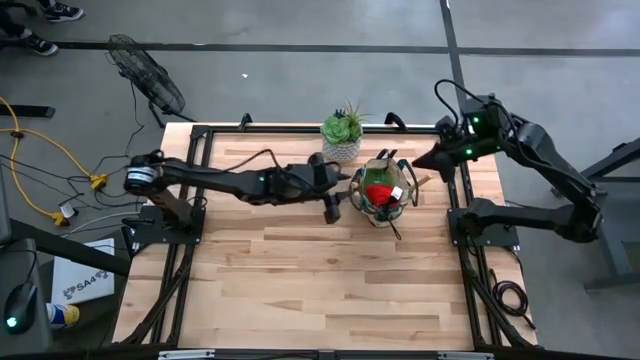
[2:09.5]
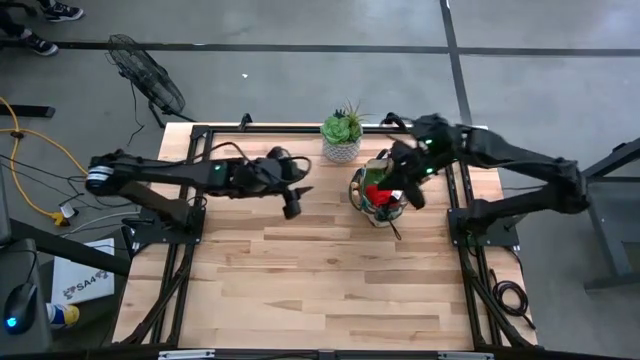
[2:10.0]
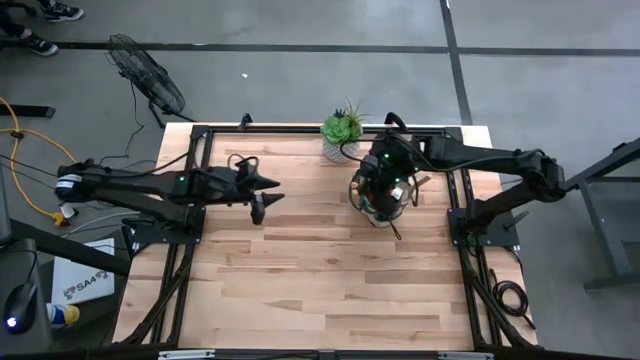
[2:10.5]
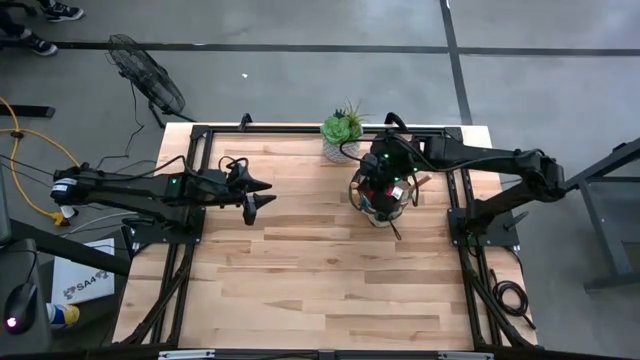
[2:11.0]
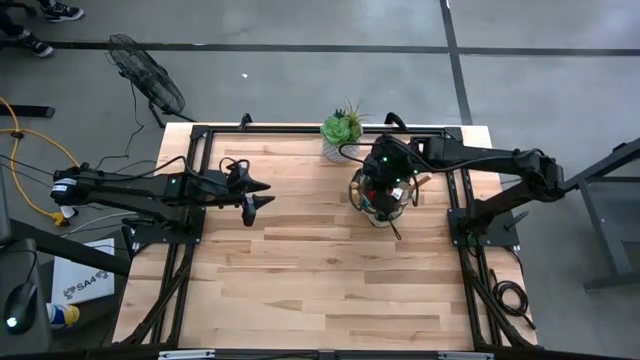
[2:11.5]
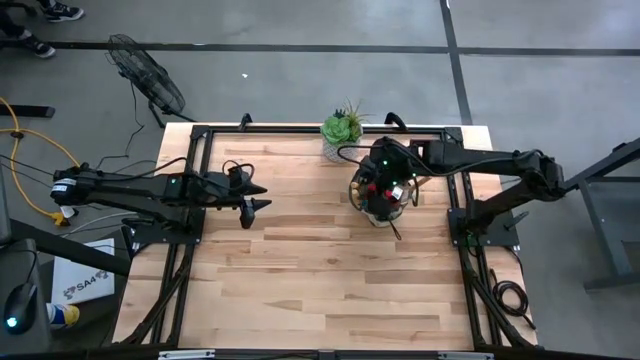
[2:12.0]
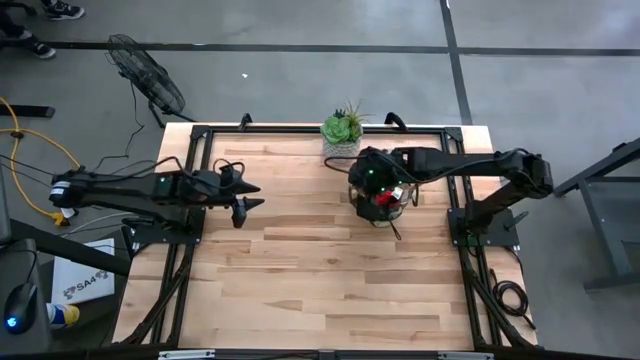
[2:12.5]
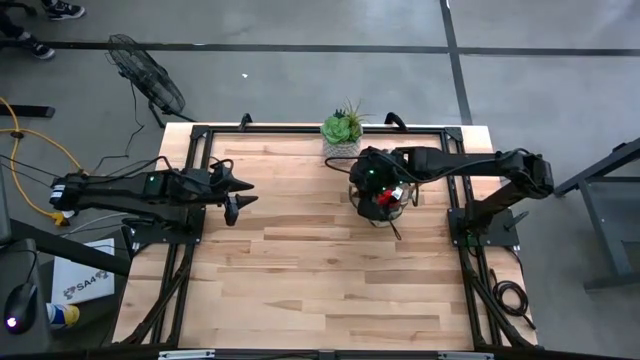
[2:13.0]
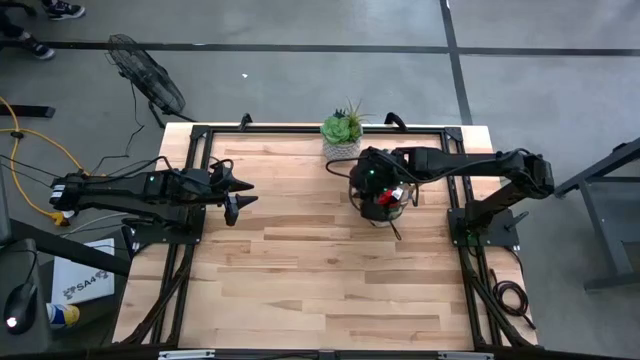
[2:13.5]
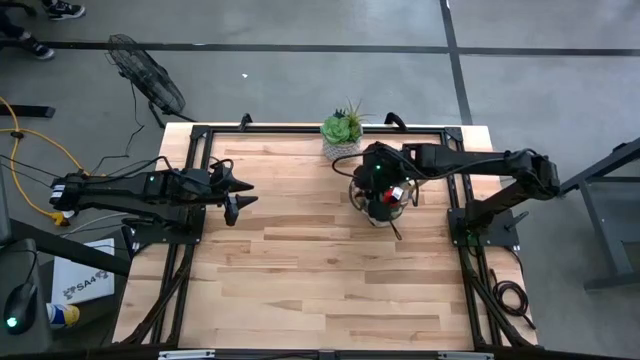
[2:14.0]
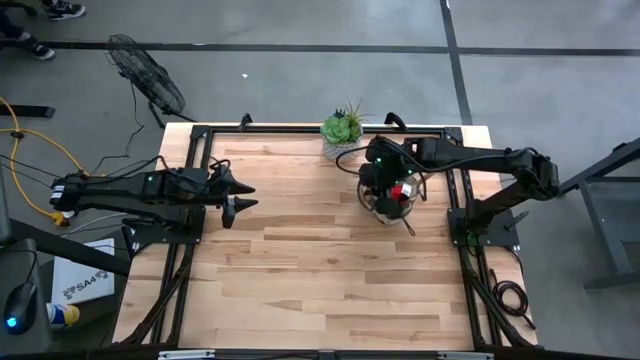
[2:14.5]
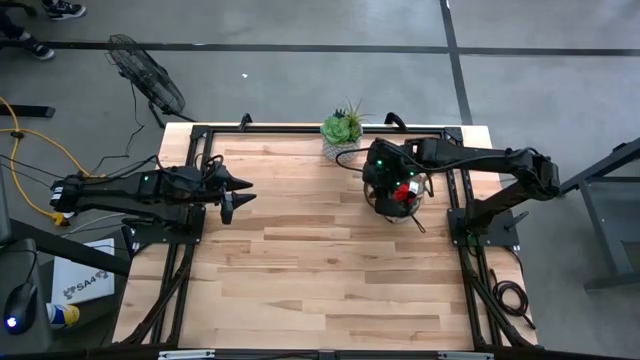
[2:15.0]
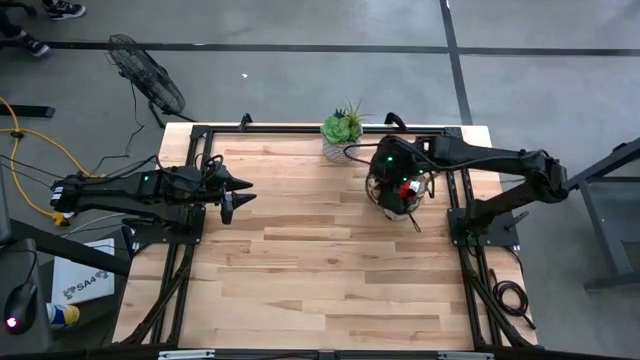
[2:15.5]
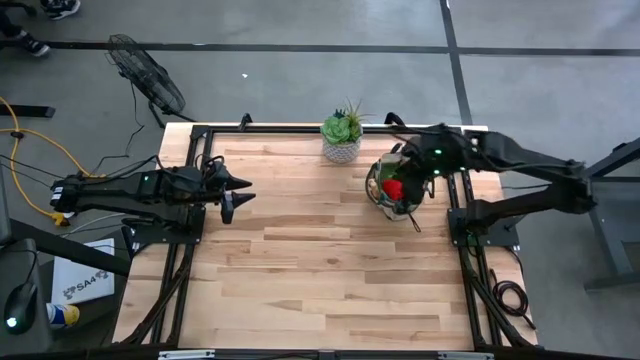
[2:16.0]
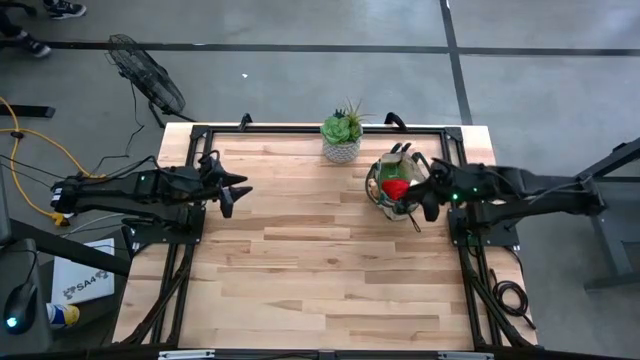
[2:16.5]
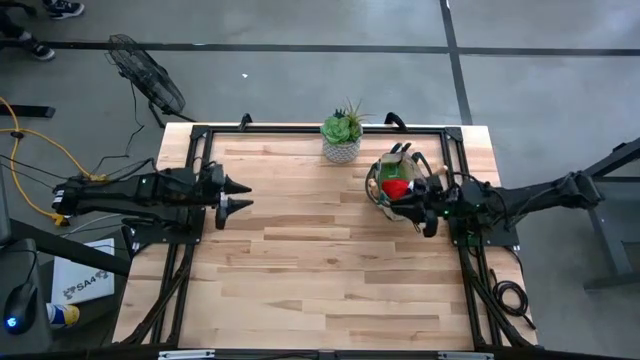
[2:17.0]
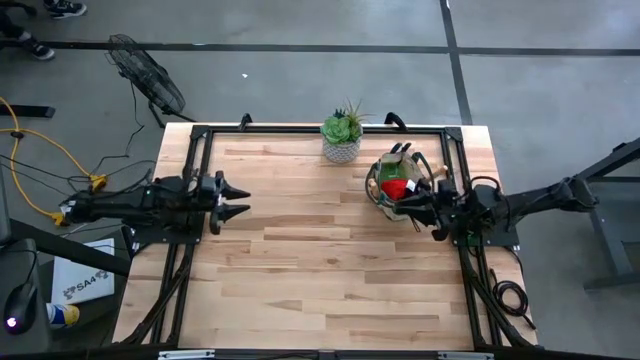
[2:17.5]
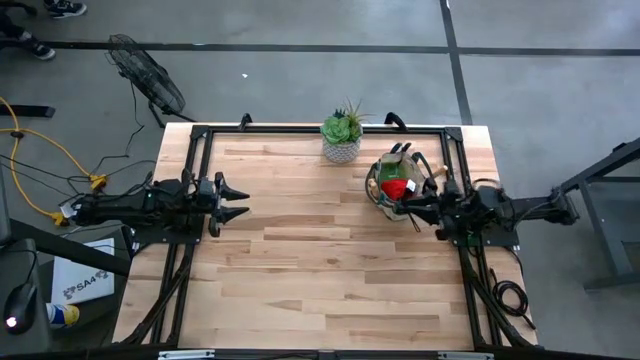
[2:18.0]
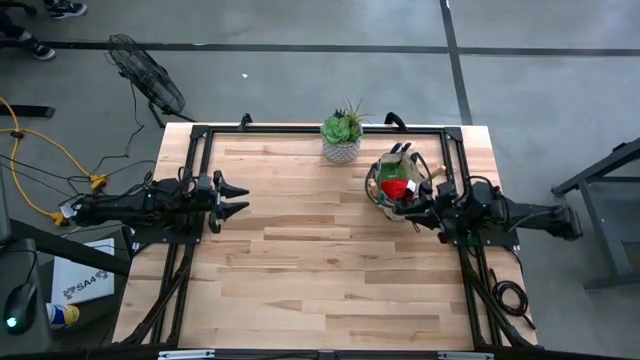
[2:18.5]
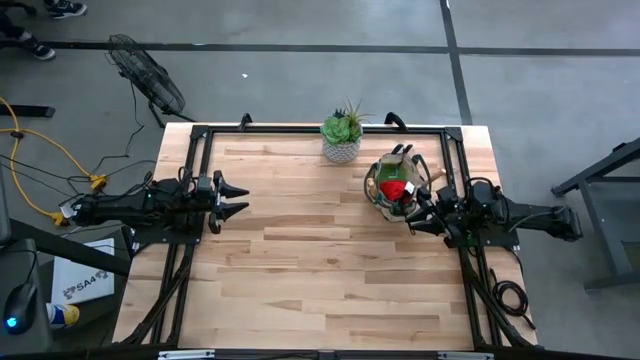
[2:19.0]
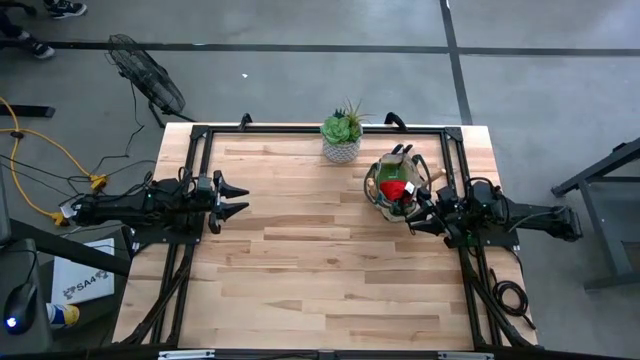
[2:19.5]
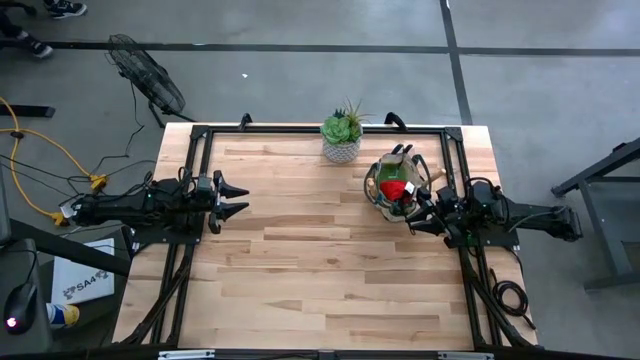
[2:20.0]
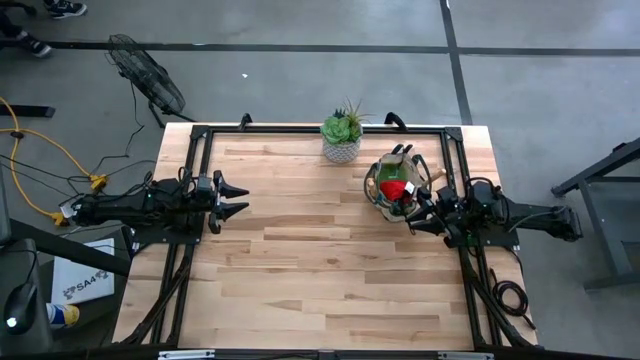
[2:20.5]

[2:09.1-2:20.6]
Task: Pick & Place Garden tools in Gardening bag
Return to Home Position

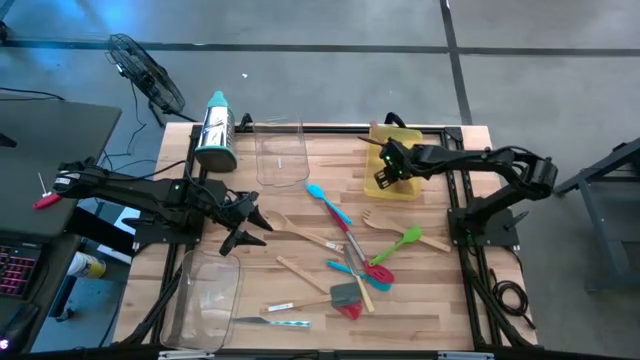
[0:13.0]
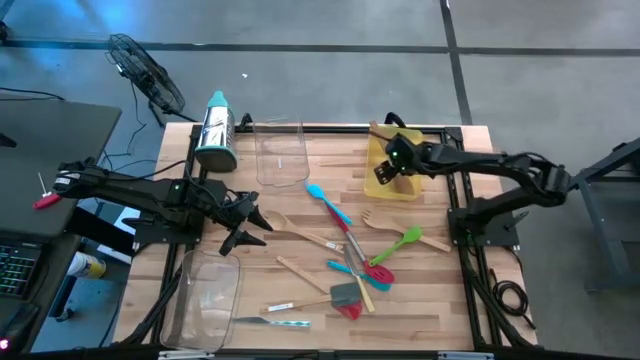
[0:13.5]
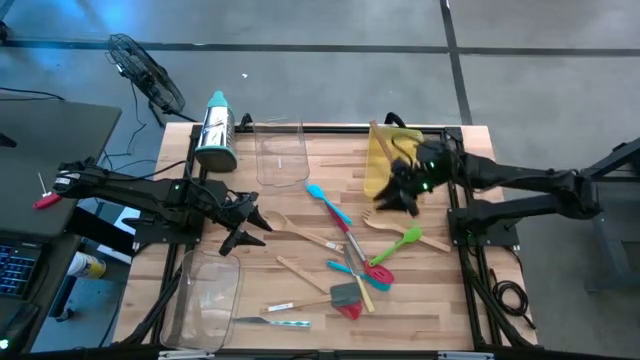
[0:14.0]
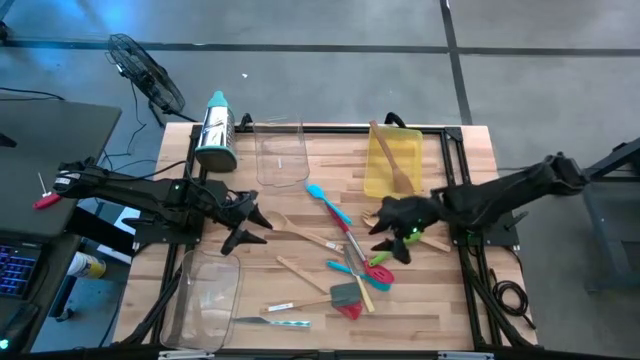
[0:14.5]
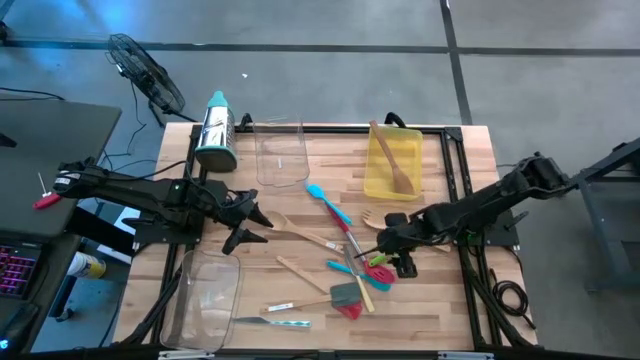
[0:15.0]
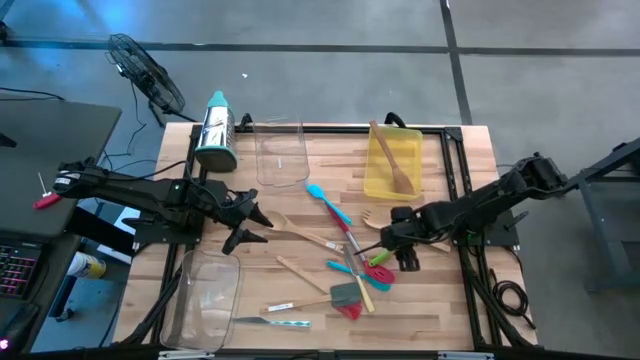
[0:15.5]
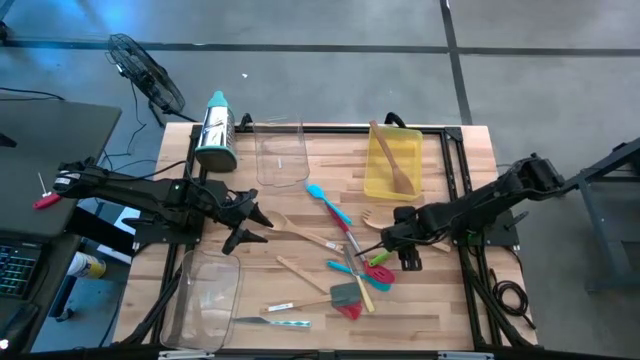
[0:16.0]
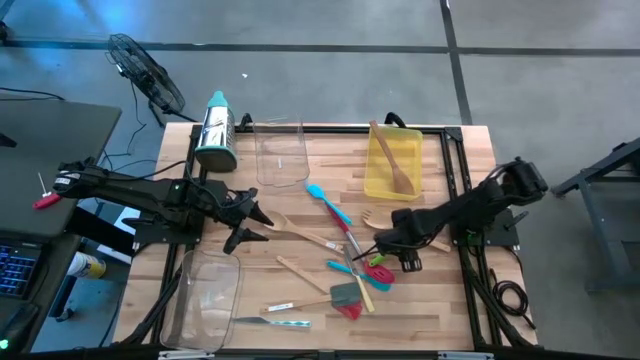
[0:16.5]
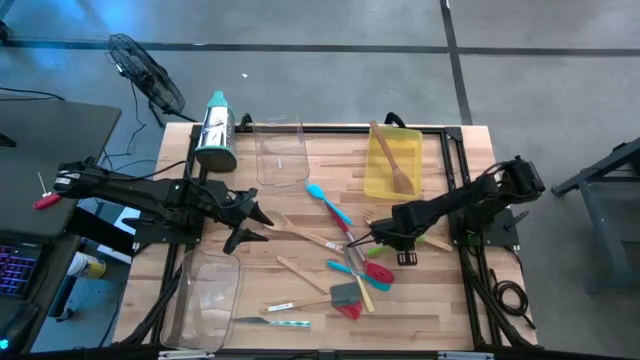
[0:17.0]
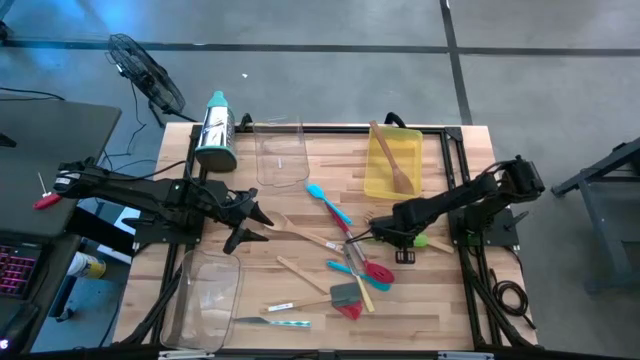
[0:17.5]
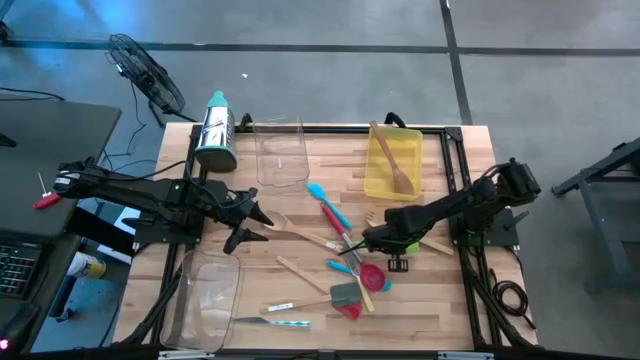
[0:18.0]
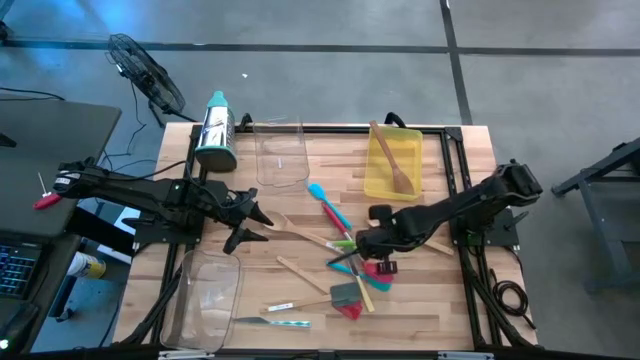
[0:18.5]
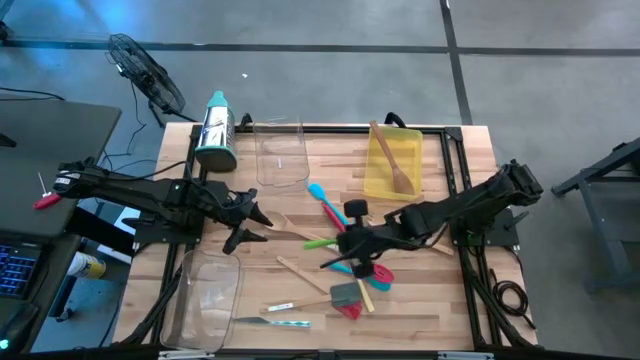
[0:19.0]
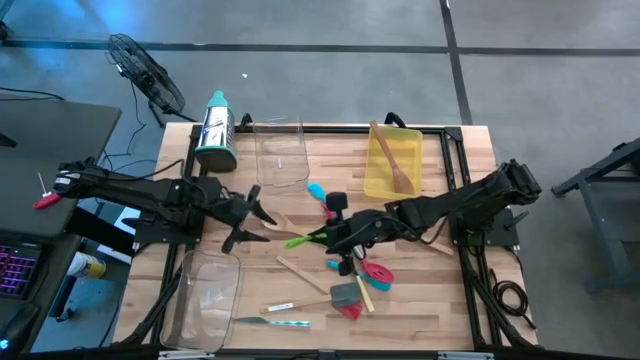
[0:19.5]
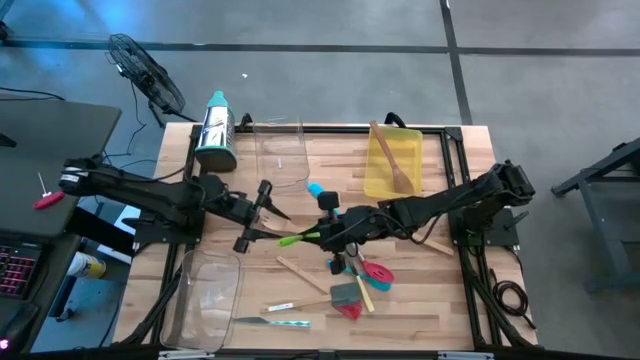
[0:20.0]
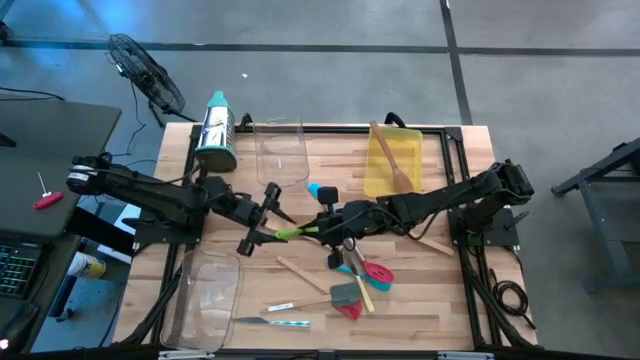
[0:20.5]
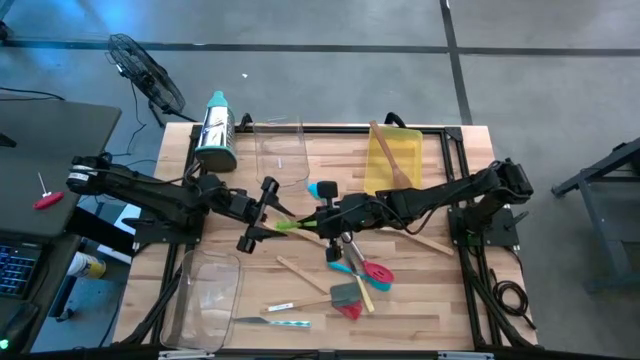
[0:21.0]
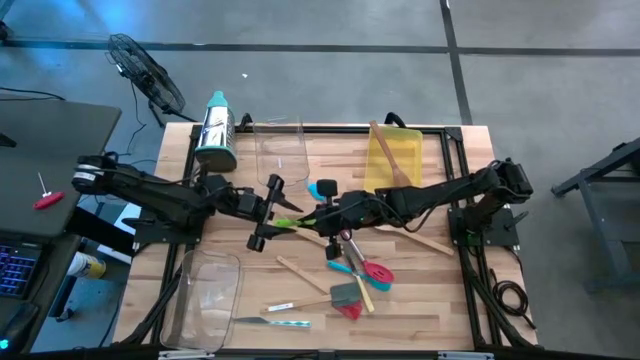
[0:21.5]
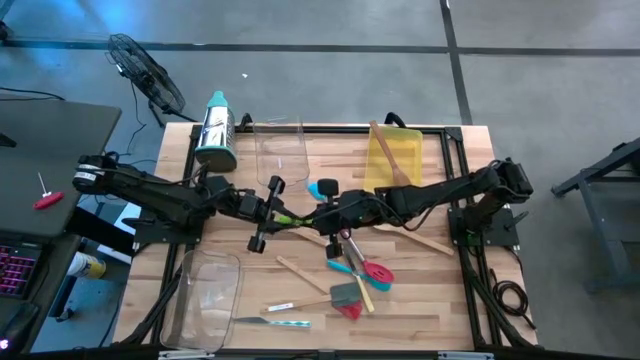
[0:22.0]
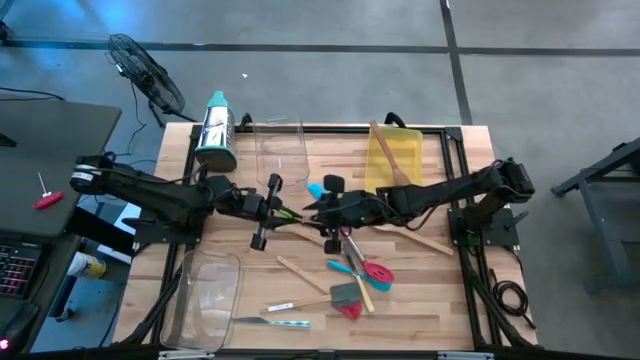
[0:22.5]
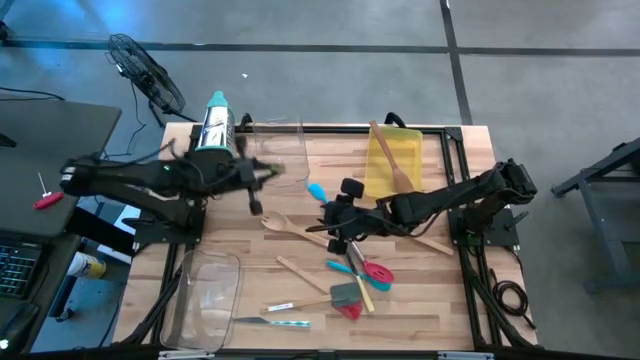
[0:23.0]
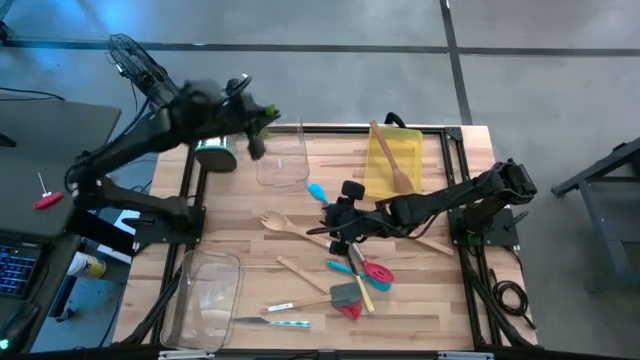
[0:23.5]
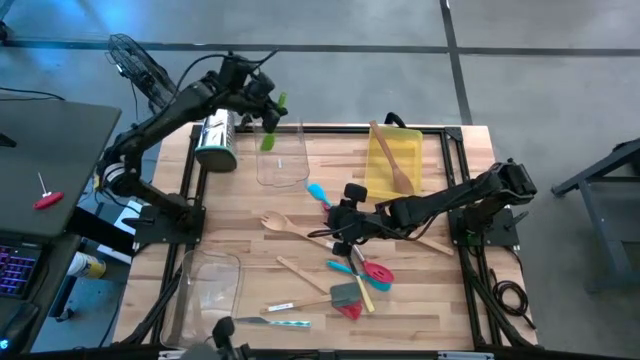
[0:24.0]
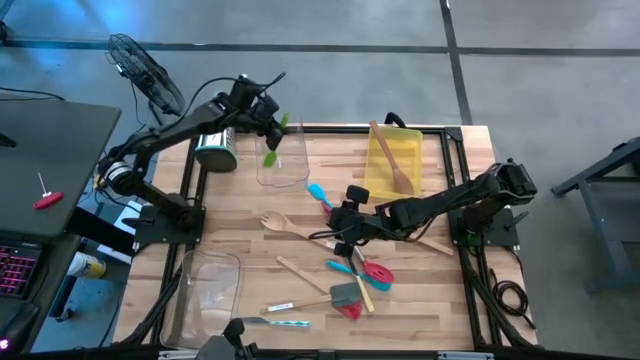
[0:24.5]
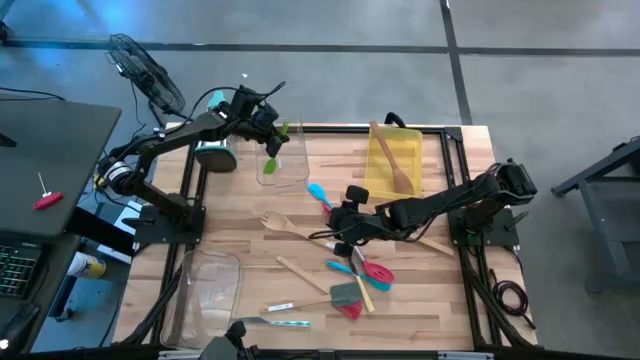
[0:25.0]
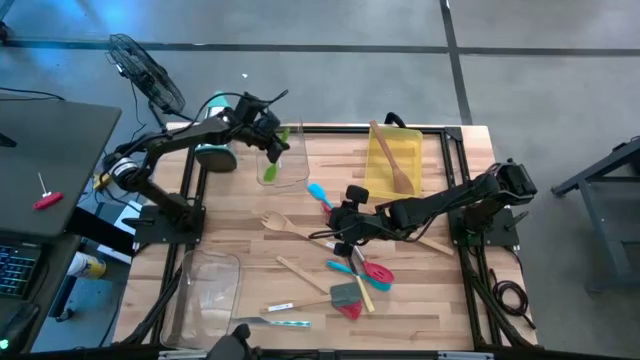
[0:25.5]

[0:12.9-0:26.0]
Task: Pick & Place Kitchen Items
Put the green spatula into the top transparent bin
